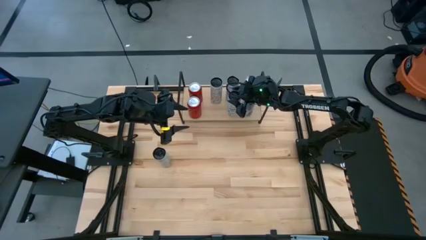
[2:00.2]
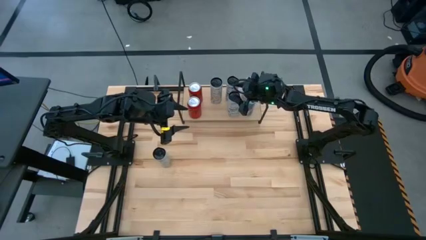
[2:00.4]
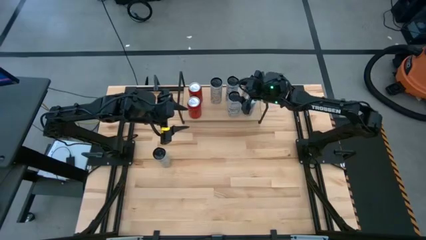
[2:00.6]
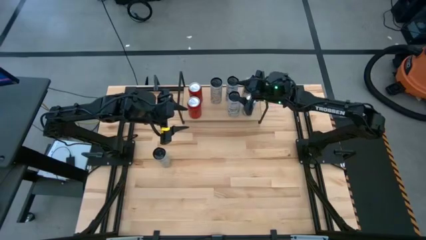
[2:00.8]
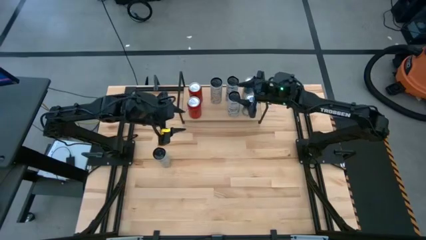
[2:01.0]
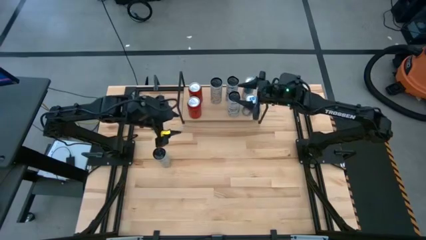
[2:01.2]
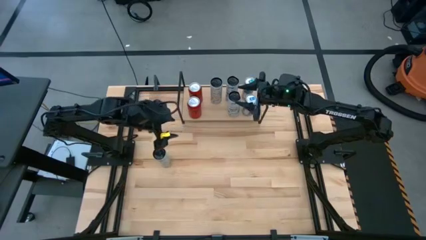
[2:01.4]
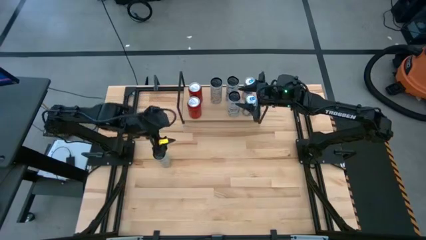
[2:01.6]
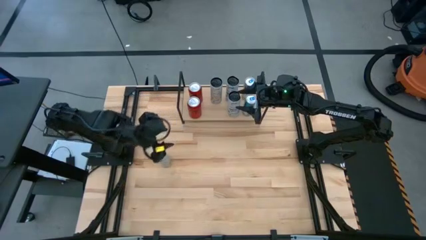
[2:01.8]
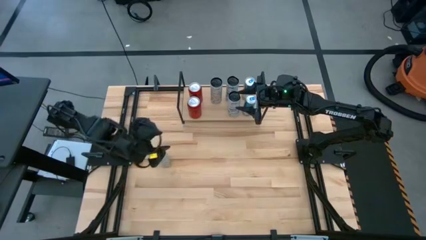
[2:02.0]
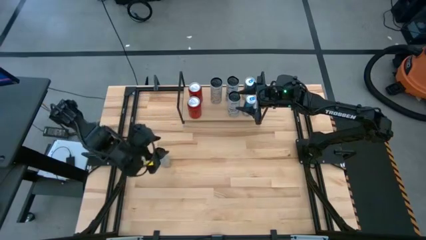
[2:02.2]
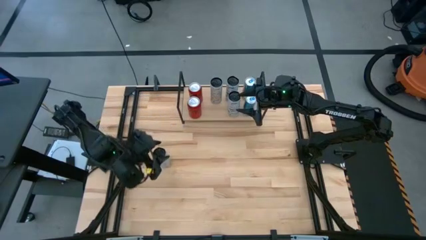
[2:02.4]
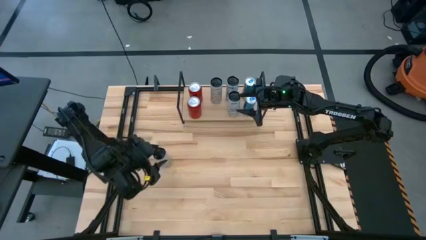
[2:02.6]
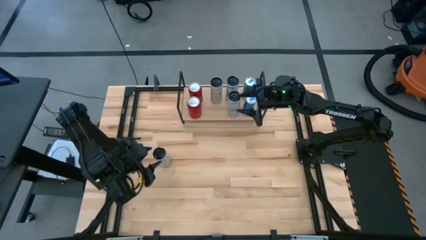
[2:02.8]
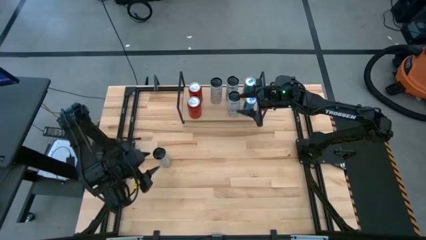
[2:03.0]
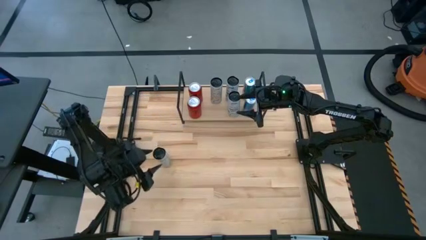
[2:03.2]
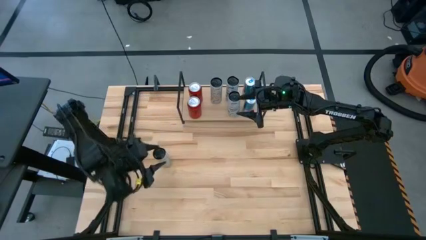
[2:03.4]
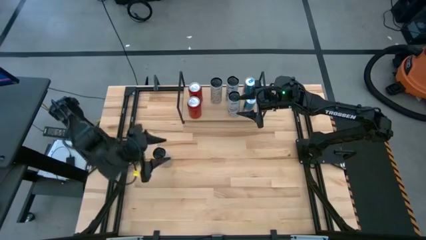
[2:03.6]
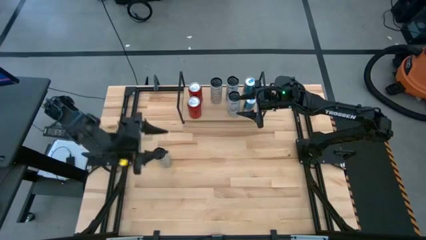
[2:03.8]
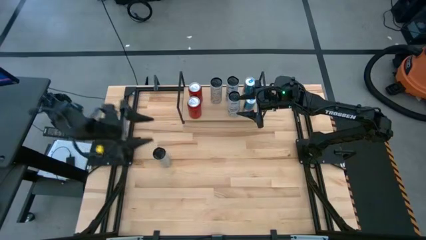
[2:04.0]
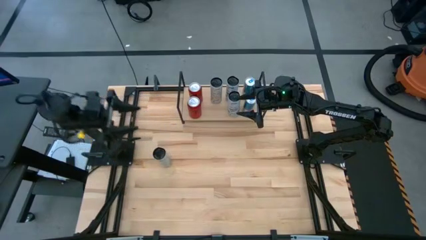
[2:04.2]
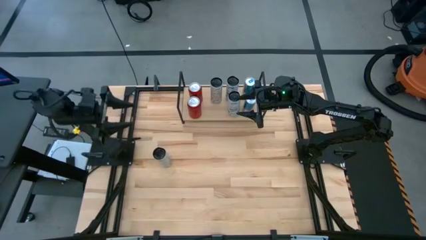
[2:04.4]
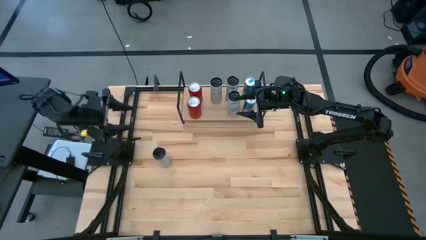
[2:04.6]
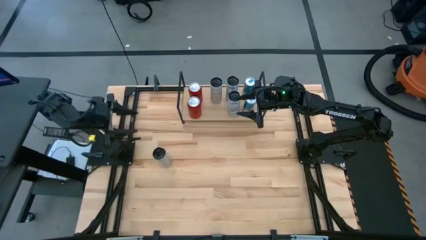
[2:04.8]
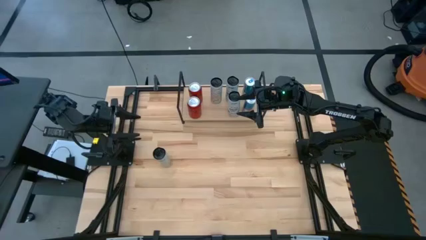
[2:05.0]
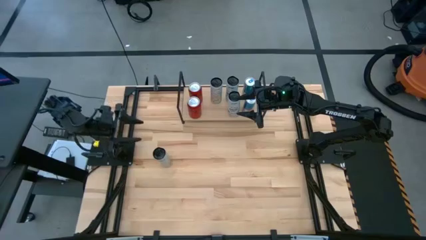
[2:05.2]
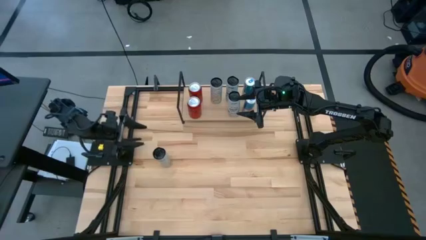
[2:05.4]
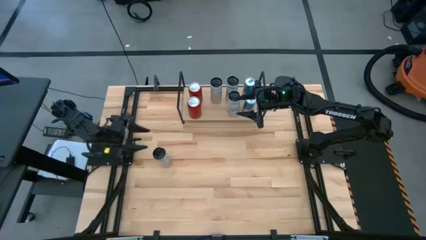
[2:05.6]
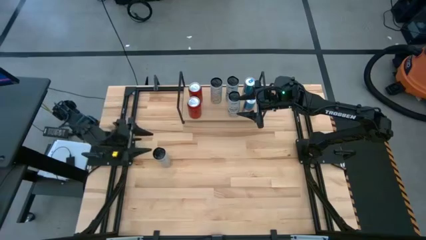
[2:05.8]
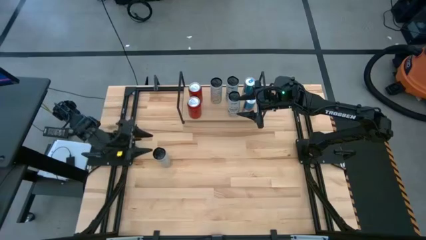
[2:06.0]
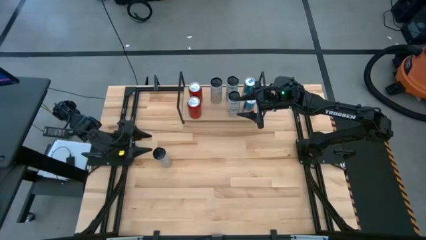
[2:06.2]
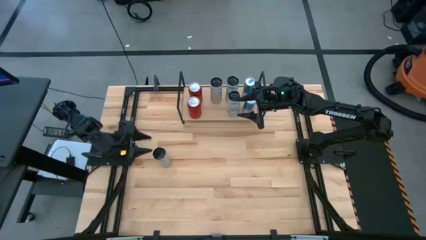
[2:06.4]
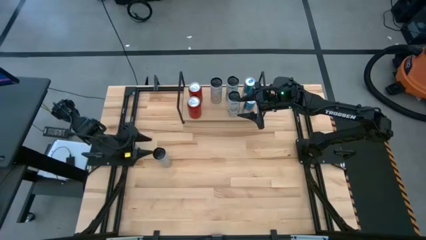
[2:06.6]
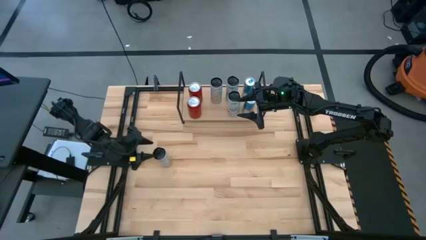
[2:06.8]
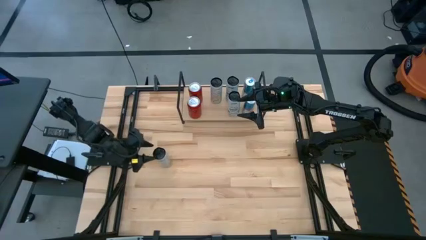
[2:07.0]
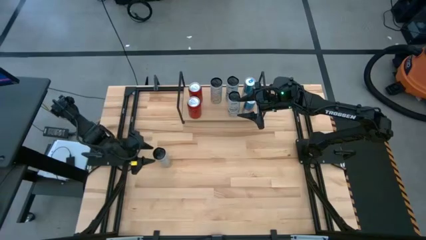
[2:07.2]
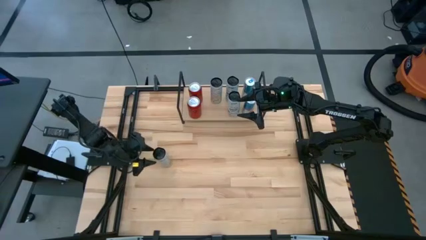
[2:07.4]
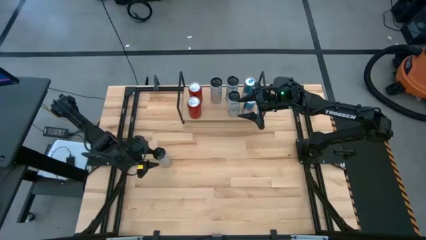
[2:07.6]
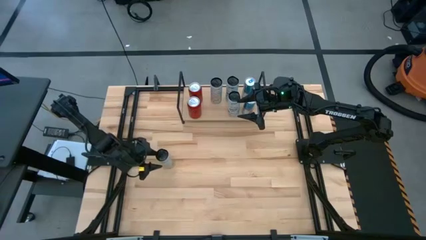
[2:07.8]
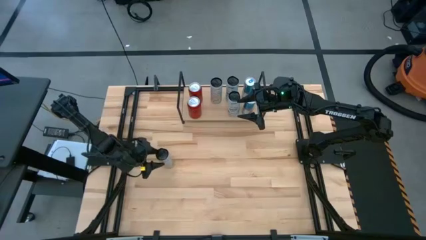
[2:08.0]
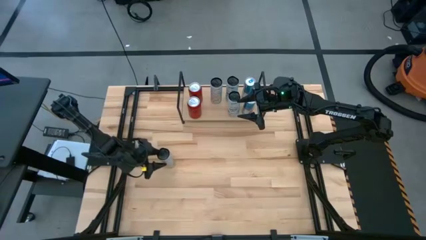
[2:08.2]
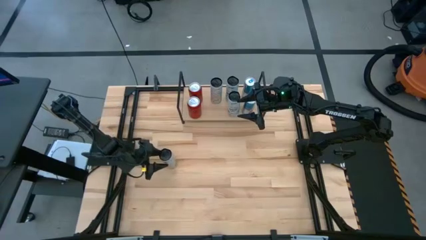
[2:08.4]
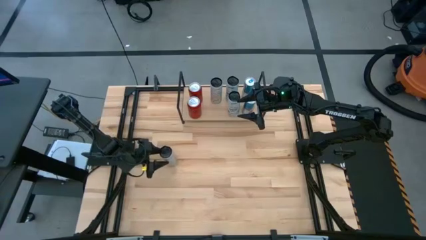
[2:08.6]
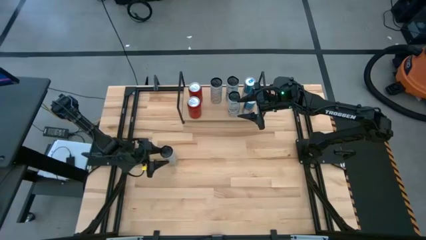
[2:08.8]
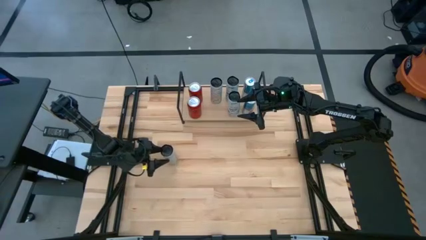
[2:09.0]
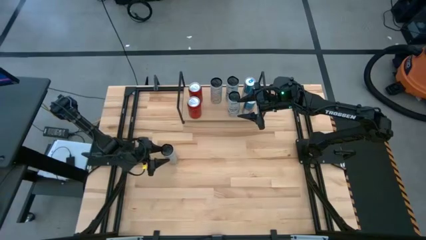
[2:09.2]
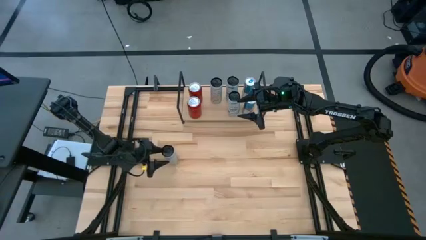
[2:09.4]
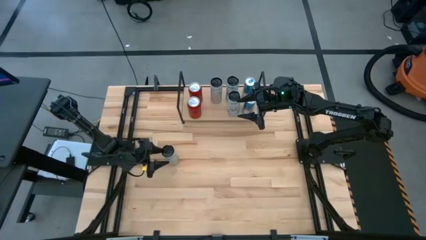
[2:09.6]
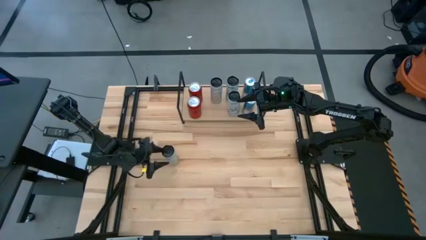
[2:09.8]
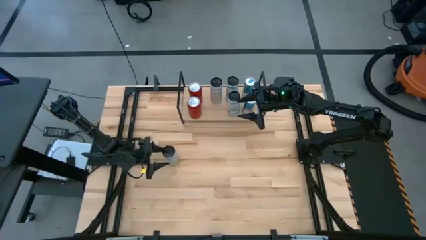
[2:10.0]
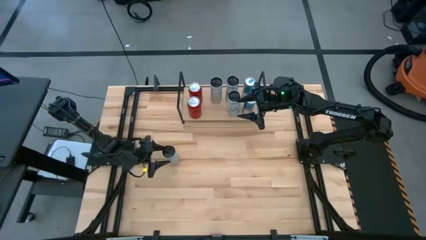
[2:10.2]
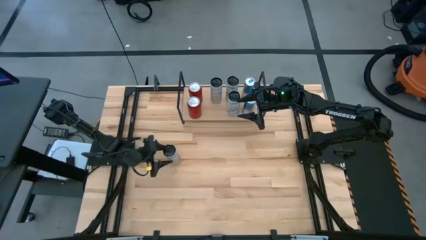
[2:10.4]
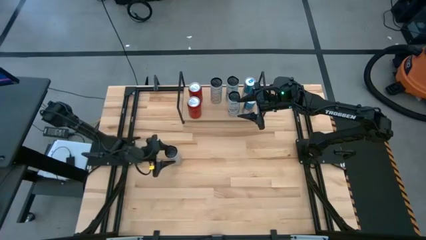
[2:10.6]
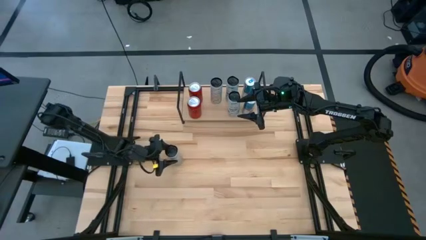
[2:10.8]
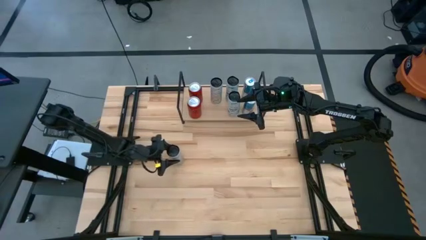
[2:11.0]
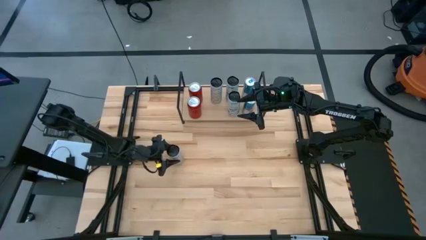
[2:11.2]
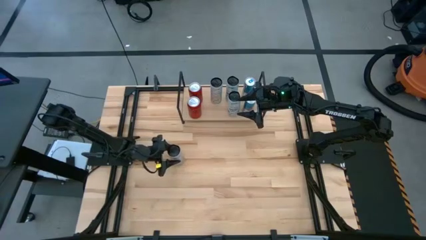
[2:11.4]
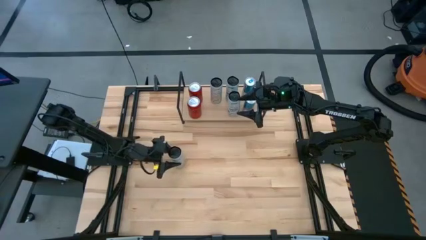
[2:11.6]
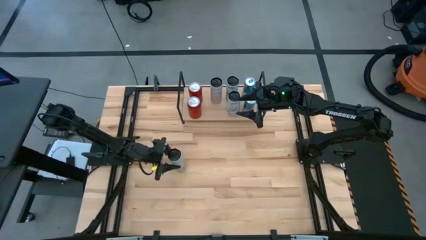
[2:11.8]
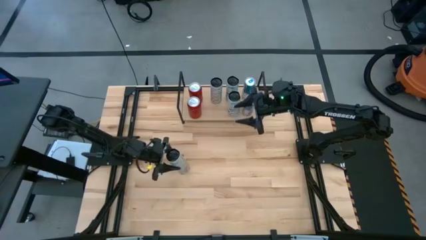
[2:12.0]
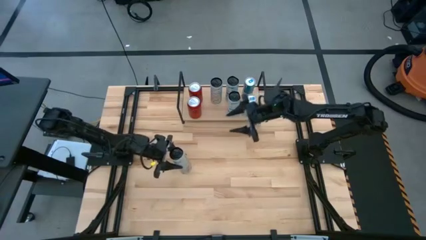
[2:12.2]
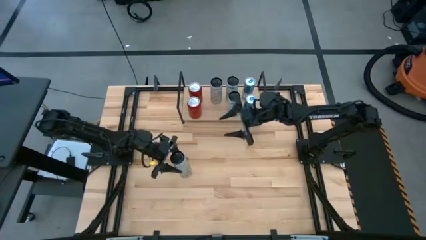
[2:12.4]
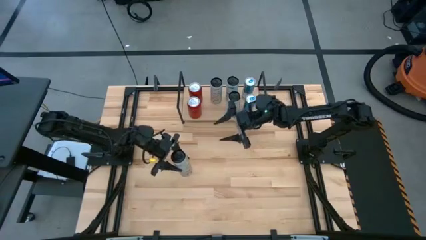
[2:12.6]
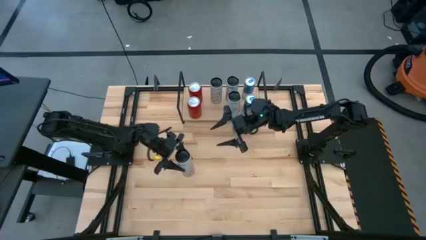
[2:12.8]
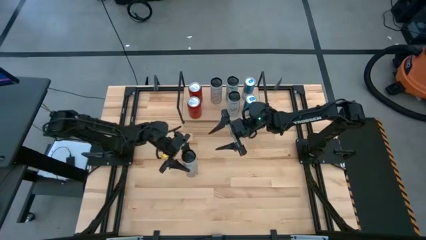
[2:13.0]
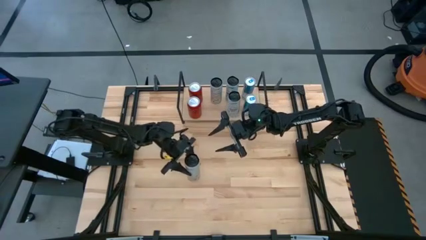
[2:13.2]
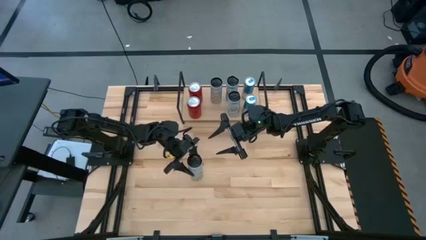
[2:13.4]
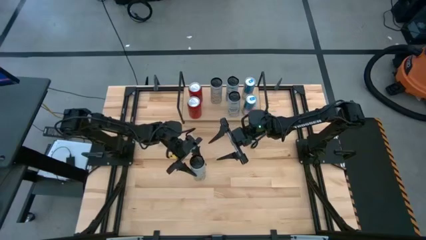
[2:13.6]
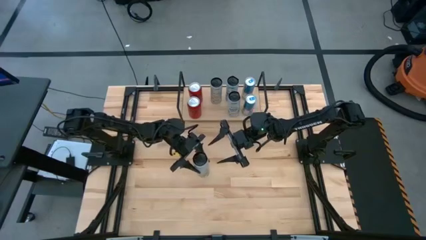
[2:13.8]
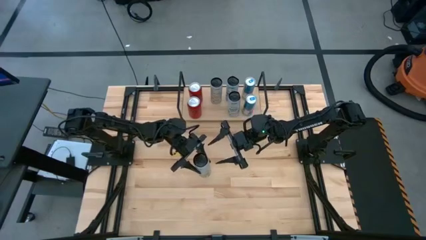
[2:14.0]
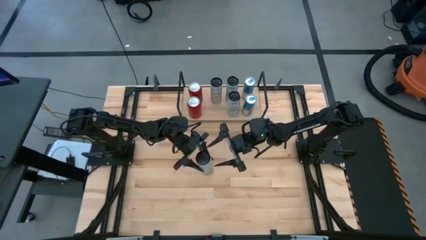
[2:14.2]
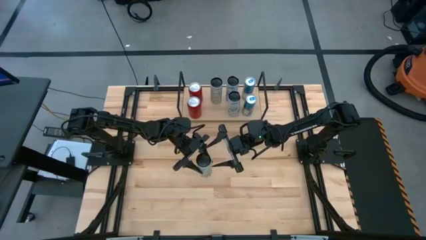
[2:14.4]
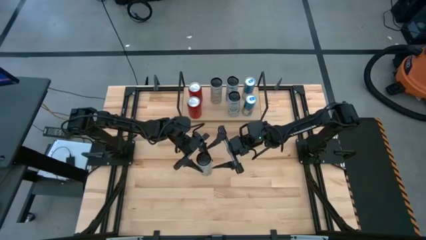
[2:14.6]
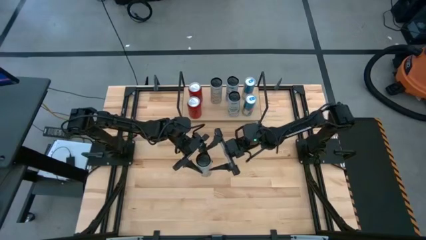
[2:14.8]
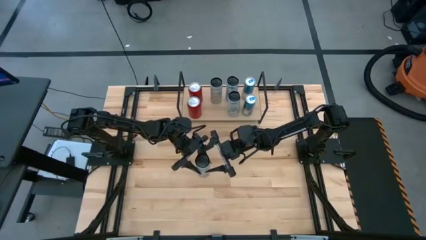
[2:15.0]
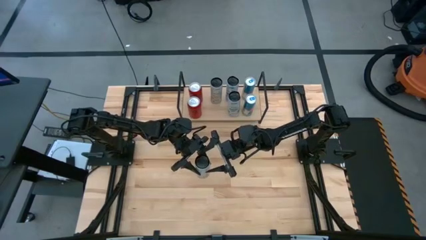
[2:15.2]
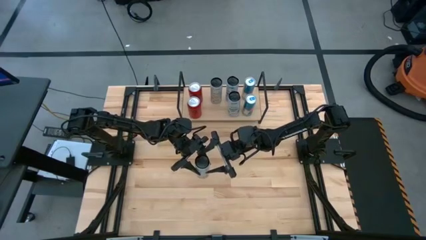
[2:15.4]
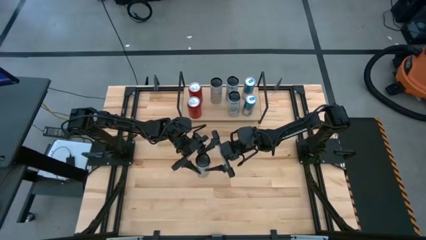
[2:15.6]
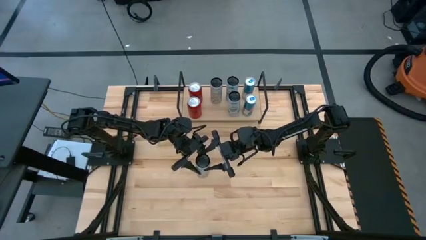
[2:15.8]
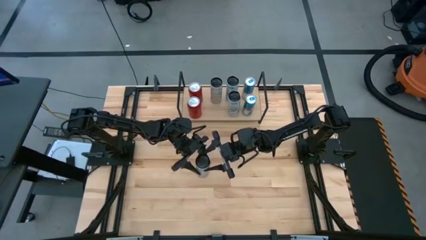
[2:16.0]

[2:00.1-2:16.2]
Task: Place canned beverage on shelf
Put the black soda can on the shelf aligned with the other red soda can

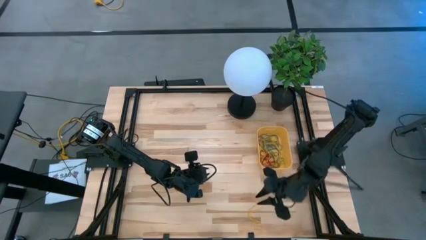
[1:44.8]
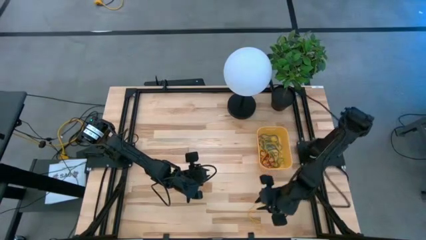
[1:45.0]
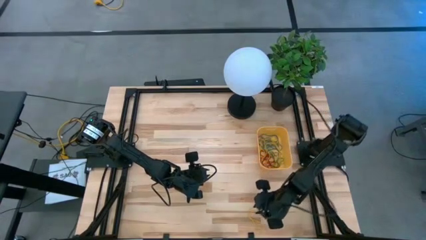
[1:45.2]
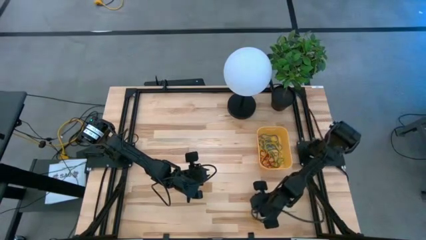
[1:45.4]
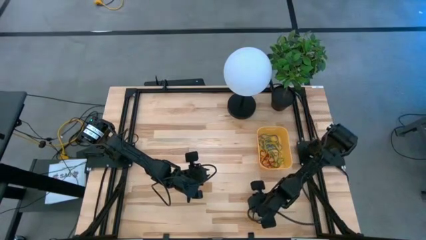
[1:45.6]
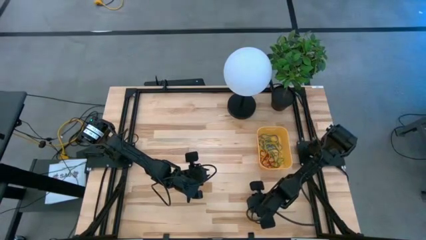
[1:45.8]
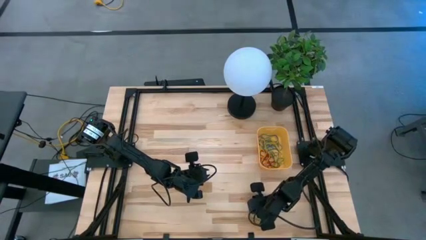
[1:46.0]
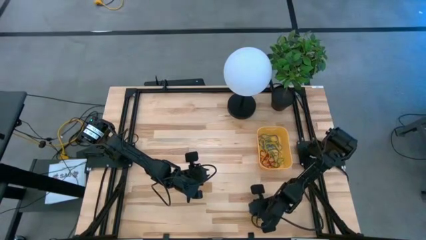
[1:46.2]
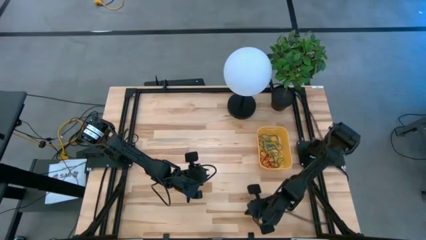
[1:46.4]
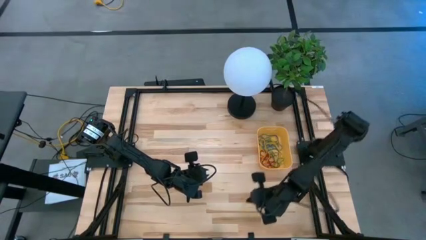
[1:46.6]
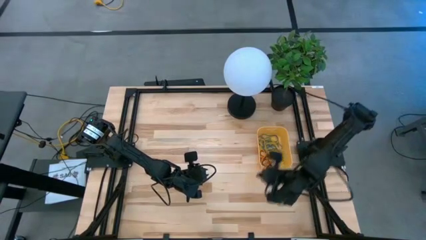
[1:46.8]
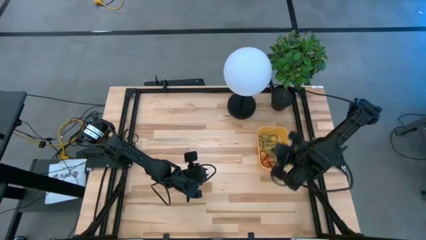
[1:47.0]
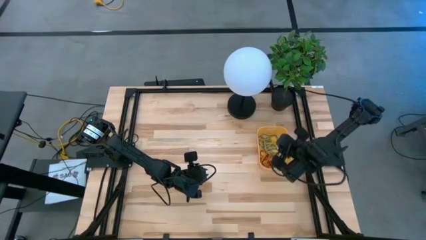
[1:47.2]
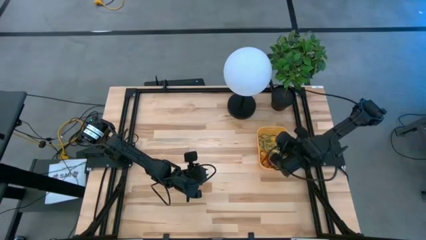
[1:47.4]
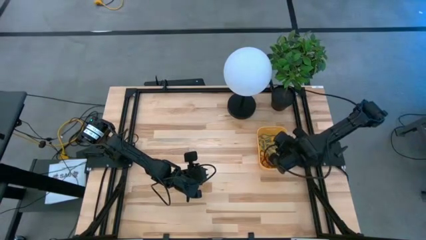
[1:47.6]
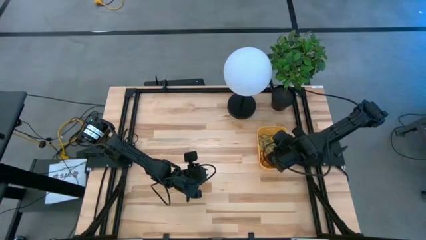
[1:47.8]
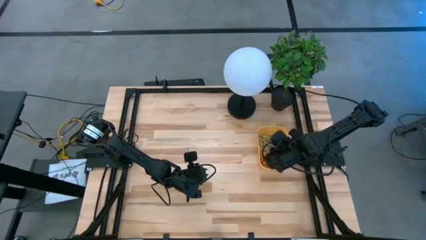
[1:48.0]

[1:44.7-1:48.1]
Task: Pick and place items into bin
Put the yellow rubber band into the bin
